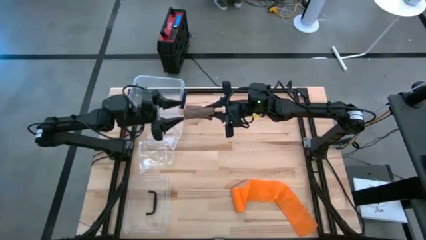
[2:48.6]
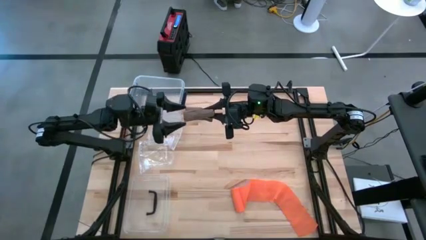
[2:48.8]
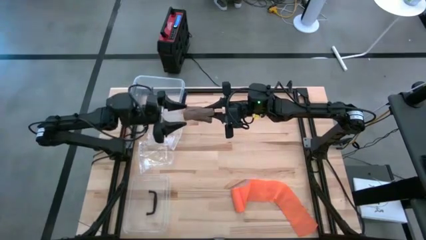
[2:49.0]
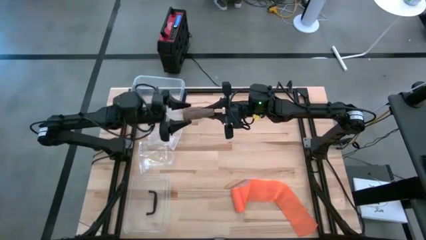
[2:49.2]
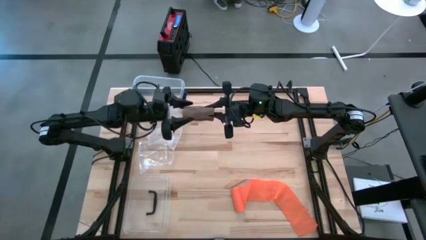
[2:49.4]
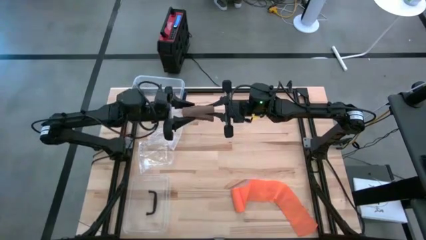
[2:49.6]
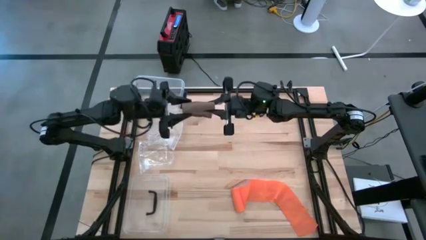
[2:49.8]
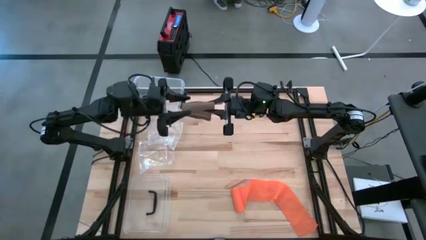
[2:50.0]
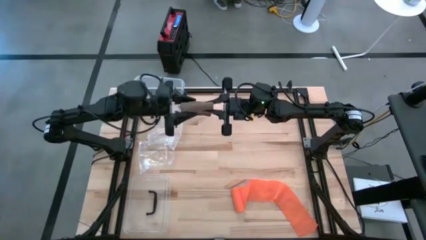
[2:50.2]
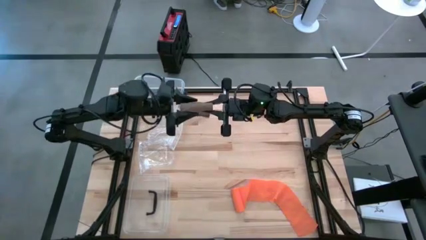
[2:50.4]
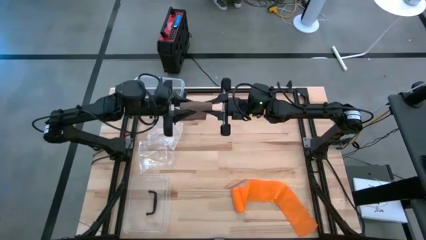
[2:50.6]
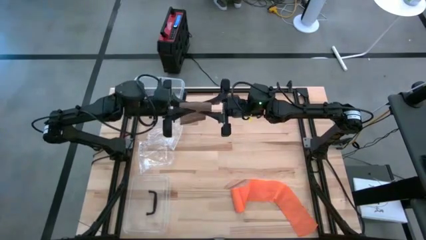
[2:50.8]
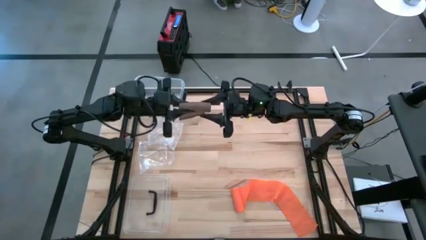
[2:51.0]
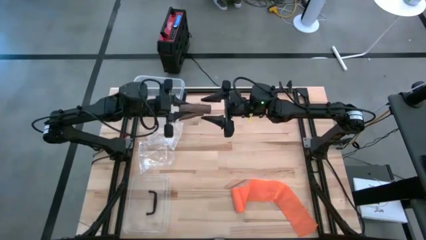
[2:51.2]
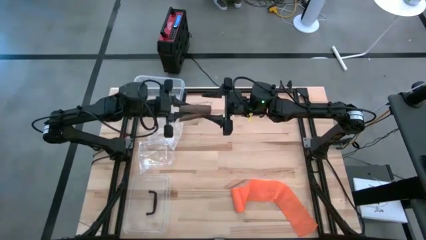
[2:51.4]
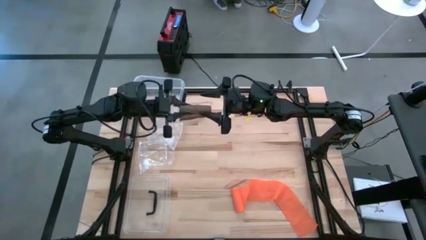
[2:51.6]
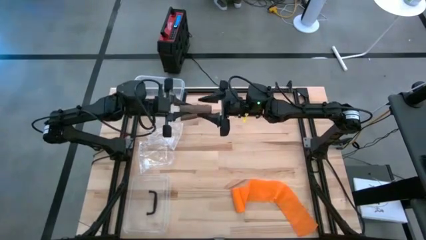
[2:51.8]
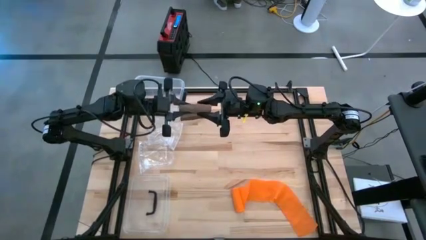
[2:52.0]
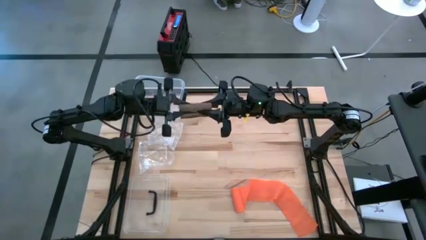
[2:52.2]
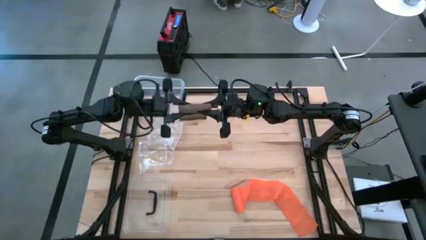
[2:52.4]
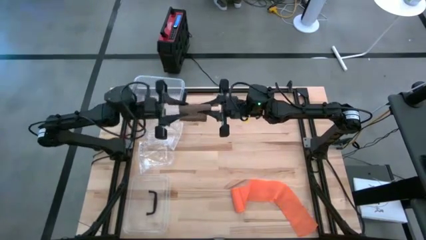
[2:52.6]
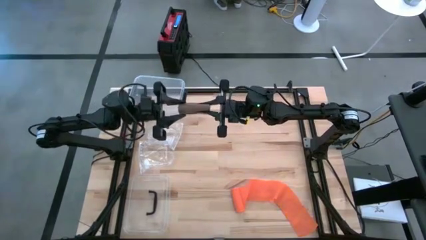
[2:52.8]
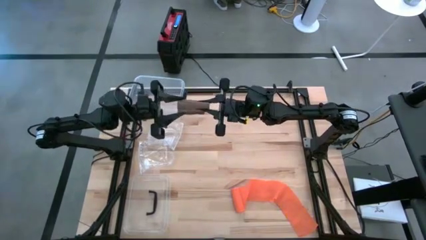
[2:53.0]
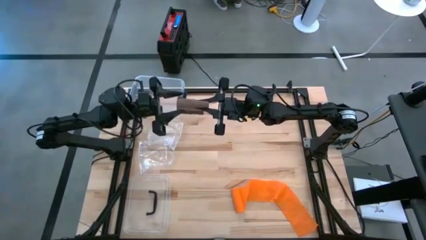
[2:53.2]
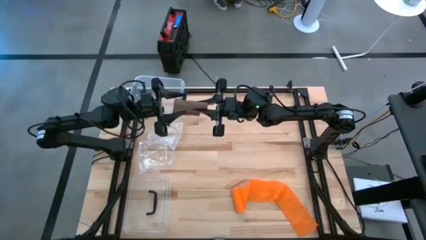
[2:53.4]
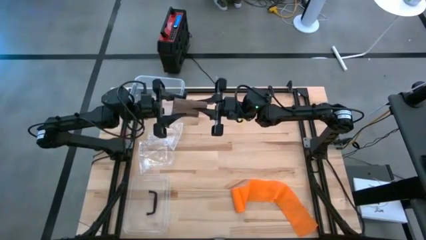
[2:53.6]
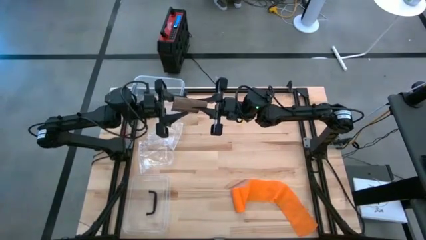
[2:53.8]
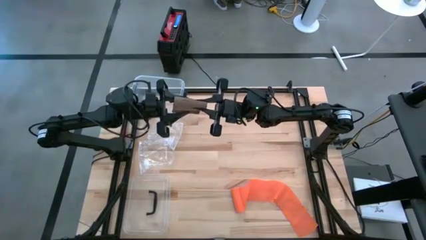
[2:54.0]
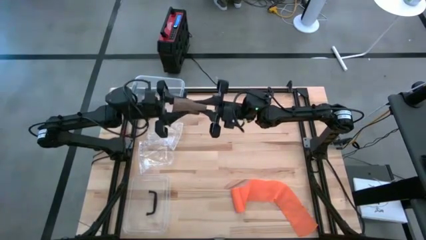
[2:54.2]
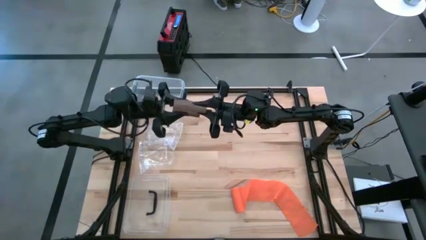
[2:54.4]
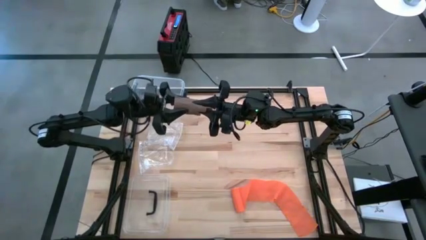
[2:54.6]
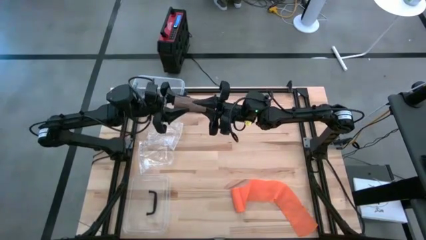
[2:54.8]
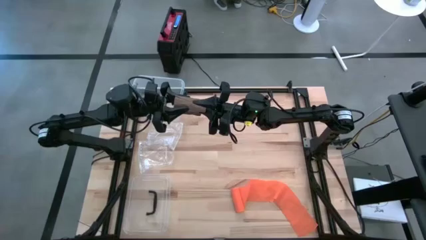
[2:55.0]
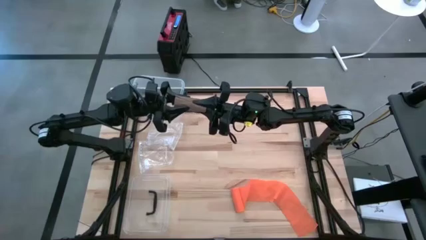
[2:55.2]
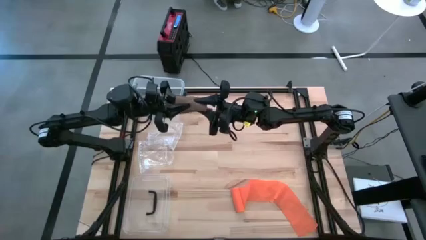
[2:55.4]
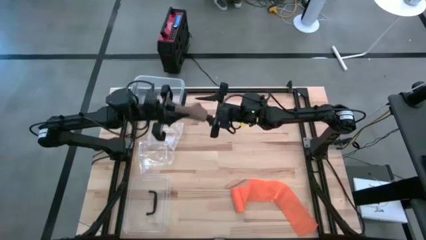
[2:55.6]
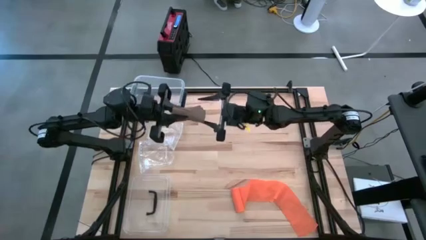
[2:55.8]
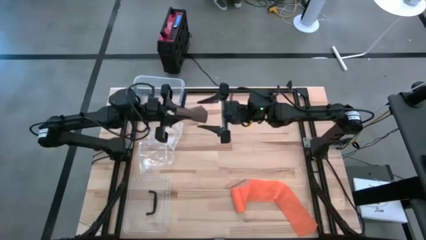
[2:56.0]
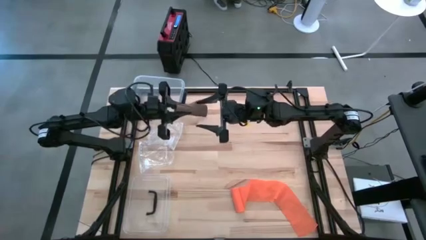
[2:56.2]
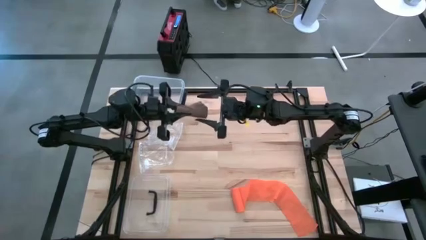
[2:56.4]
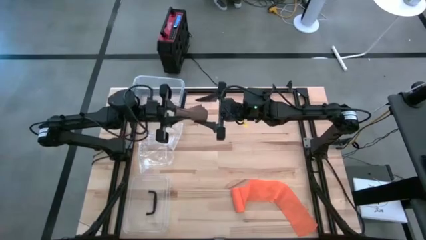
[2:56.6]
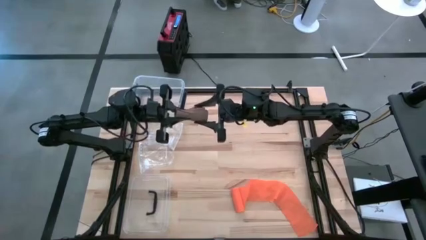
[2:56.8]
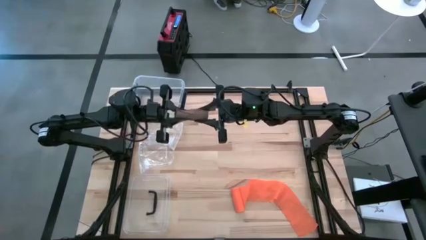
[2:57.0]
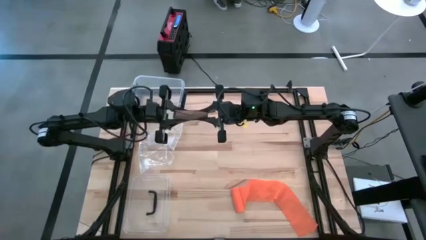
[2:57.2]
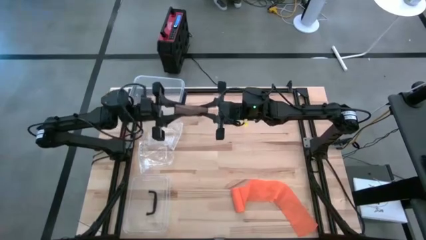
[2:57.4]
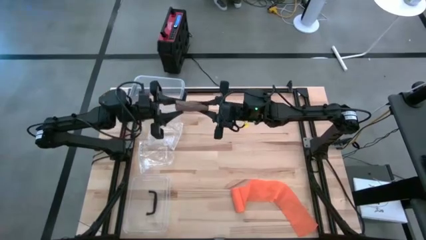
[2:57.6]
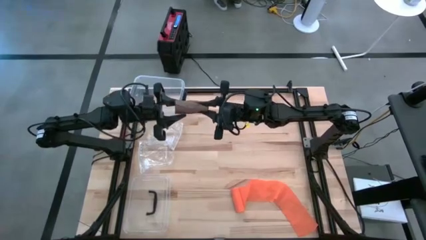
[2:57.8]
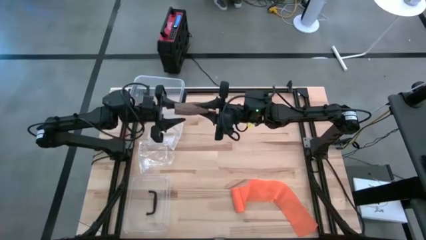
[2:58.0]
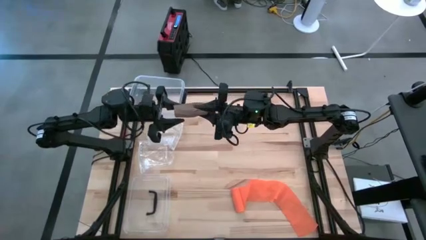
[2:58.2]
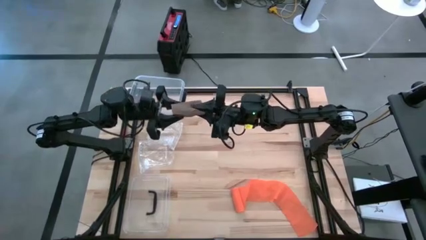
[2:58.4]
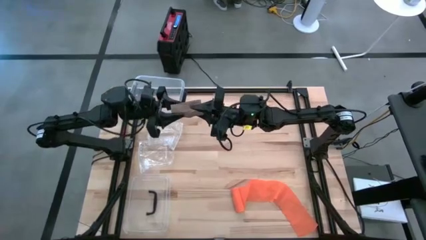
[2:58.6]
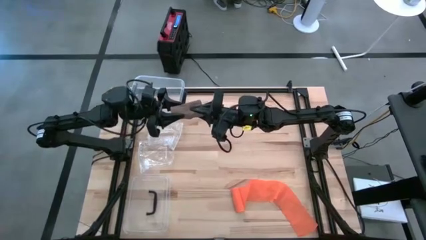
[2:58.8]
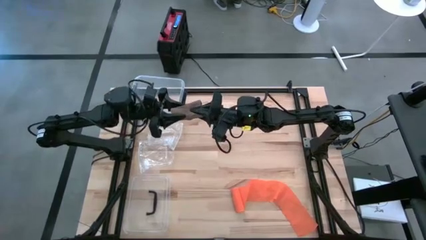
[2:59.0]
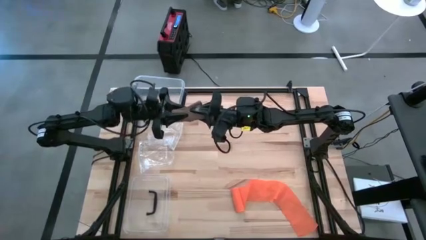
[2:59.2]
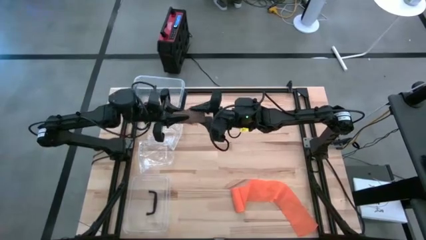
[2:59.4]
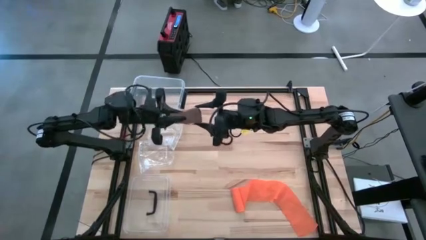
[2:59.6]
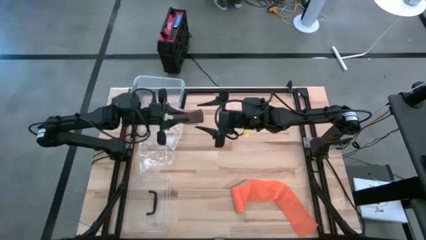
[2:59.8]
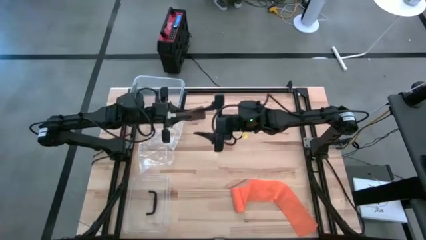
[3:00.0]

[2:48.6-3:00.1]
Task: Roll bandage
Roll the brown bandage

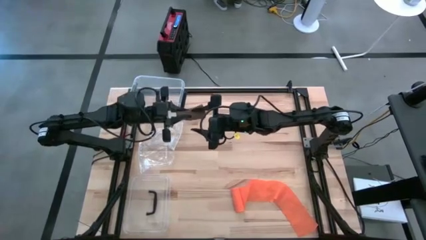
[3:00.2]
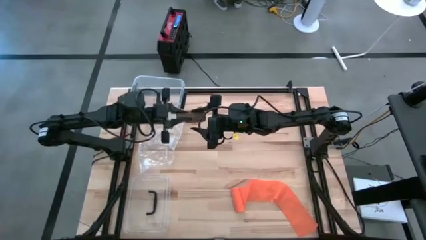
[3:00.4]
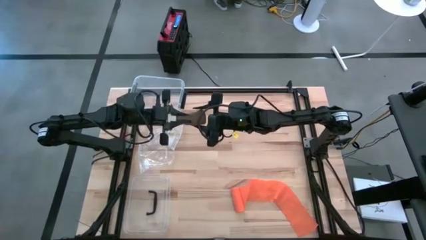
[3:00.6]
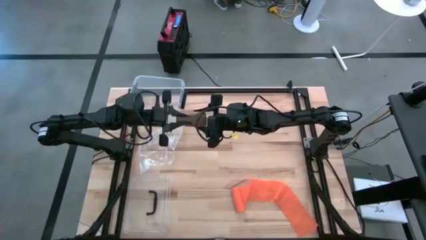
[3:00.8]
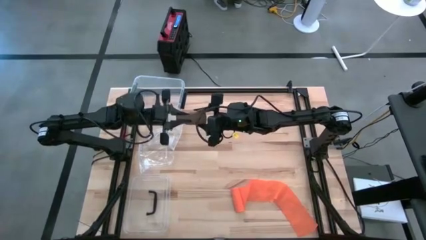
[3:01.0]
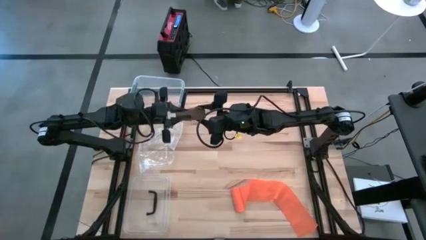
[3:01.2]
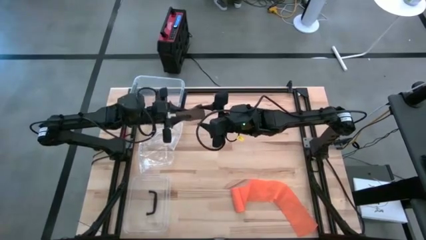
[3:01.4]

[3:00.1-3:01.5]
Roll the brown bandage

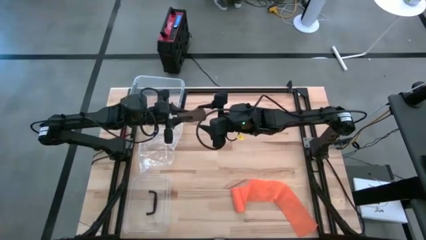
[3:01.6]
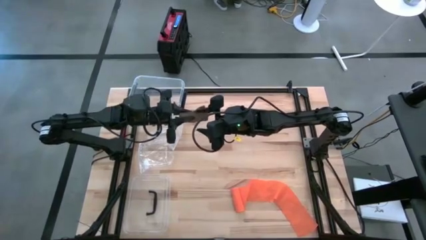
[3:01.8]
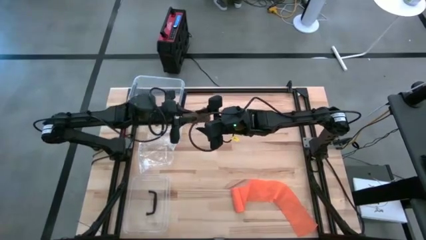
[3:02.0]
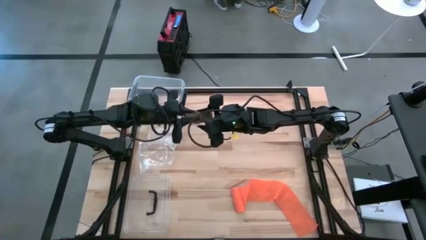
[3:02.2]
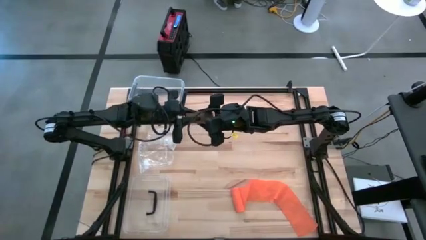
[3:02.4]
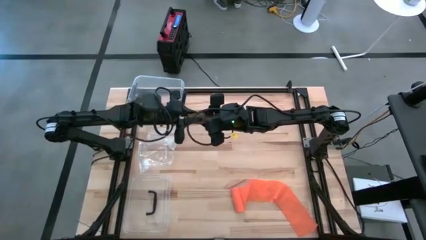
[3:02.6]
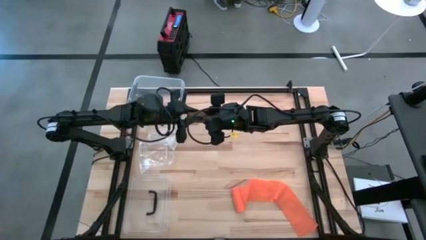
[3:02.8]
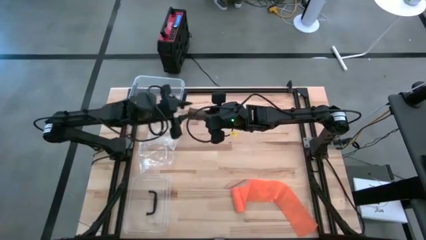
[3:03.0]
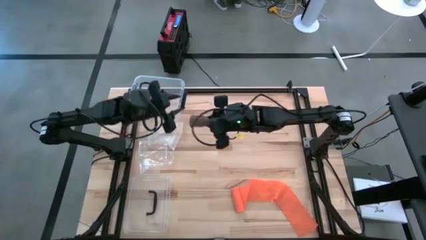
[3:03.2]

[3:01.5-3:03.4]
Roll the brown bandage

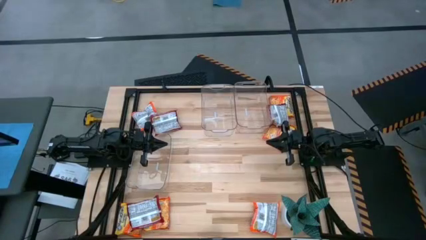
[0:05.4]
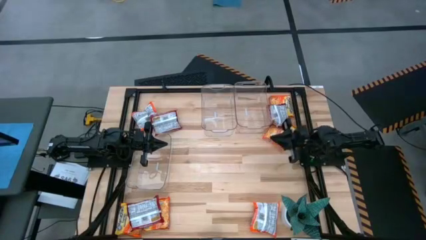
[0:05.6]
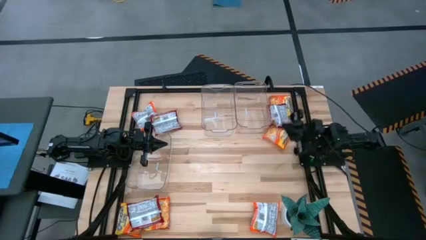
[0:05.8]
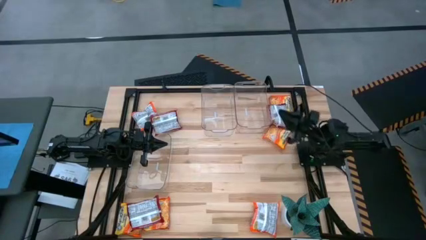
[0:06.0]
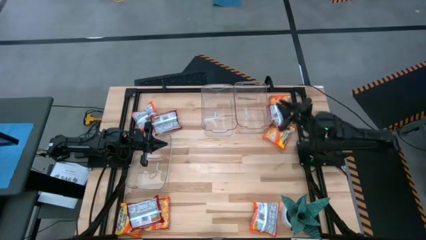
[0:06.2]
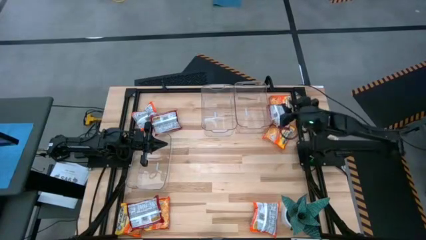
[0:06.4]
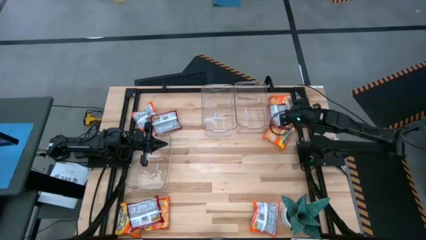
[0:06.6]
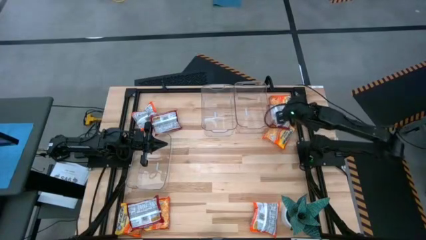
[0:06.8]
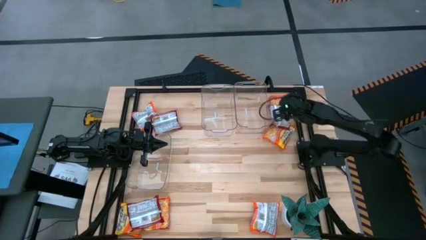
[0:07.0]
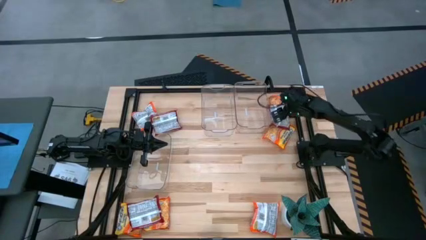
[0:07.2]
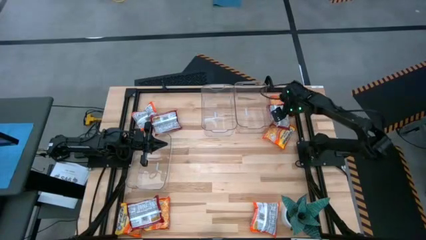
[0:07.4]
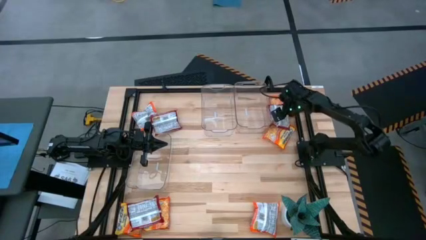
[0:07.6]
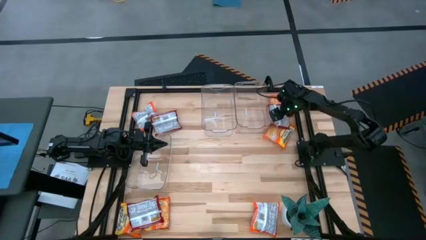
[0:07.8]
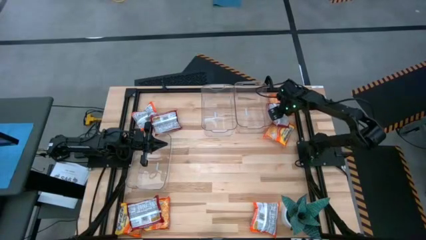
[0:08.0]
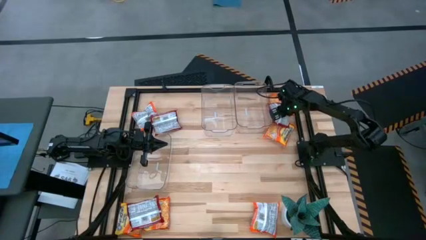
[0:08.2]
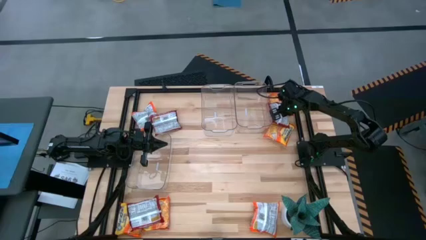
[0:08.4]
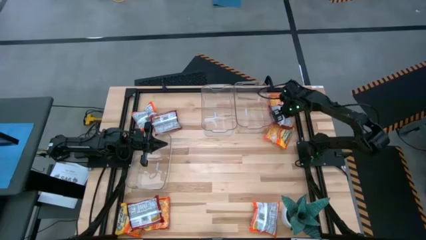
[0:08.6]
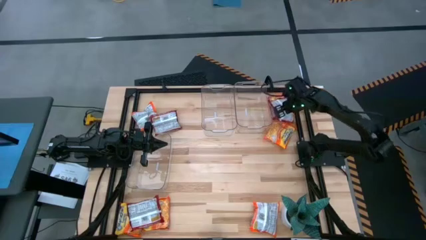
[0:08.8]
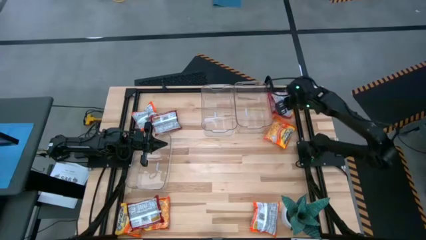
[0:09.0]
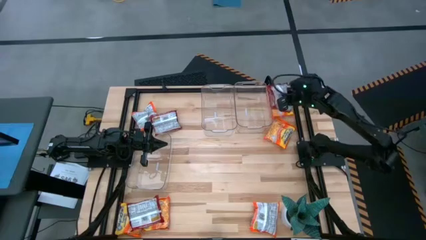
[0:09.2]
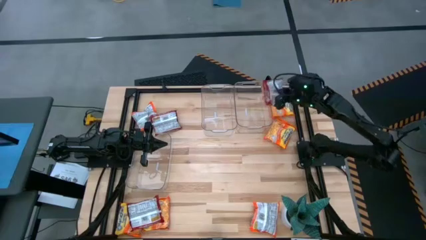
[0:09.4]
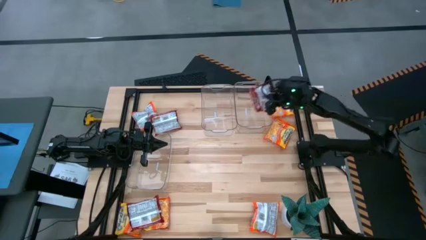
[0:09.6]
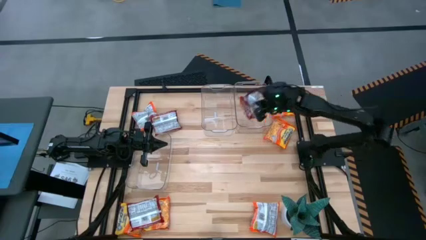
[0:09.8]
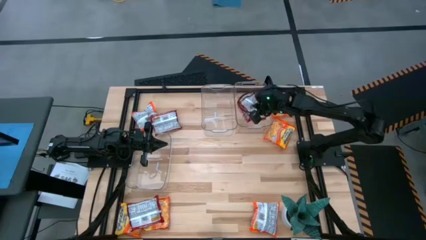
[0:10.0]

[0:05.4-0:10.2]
Task: Sort Maruchan noodles
Put the red noodle pack into the top right transparent bin
